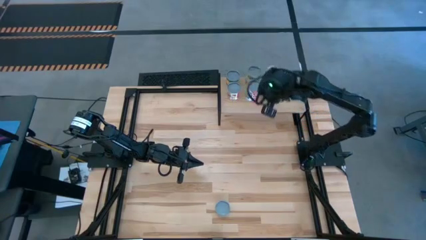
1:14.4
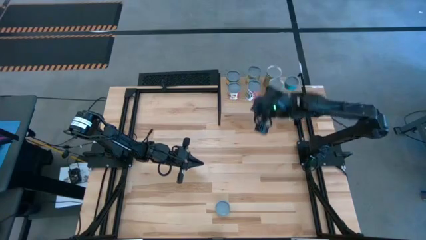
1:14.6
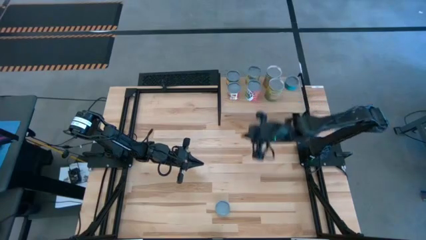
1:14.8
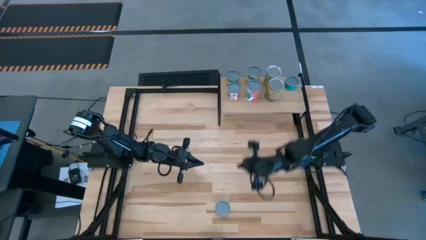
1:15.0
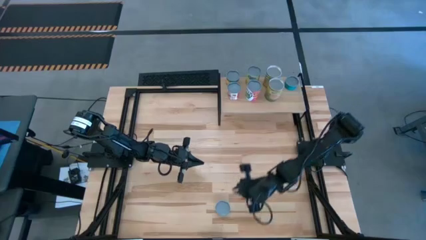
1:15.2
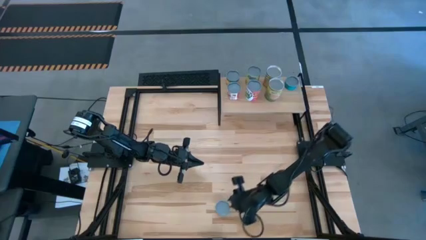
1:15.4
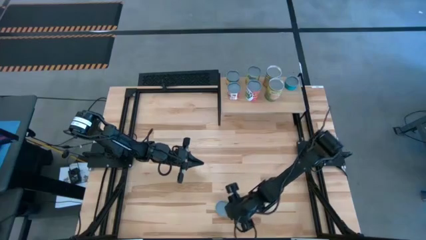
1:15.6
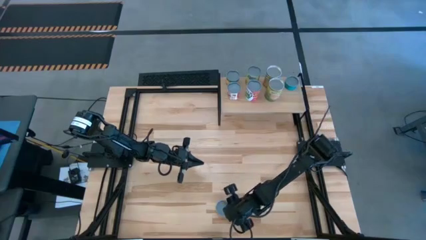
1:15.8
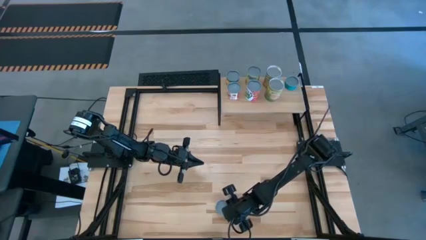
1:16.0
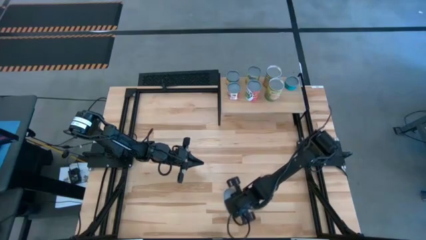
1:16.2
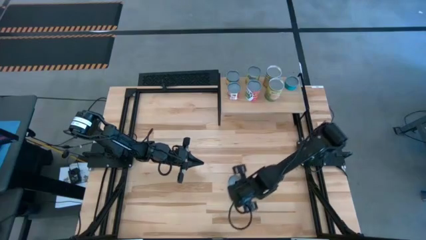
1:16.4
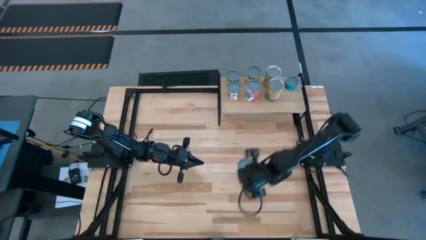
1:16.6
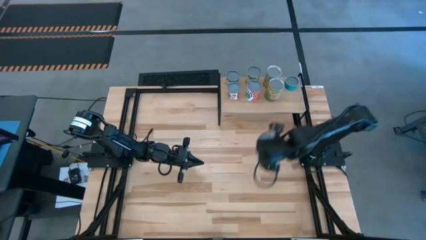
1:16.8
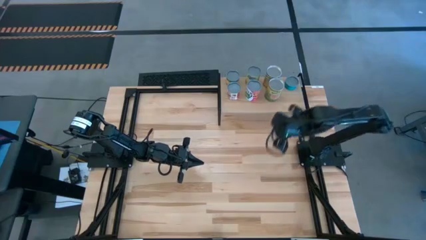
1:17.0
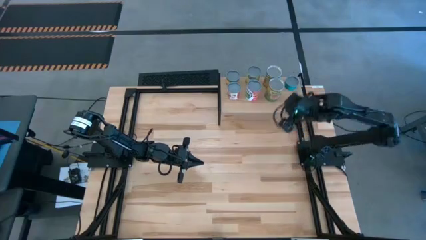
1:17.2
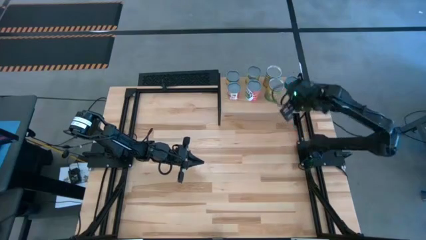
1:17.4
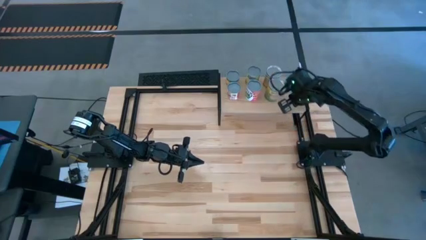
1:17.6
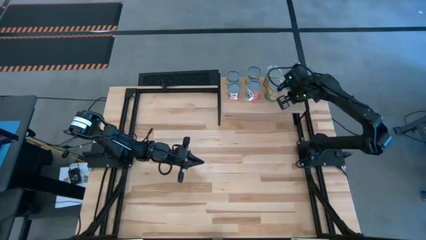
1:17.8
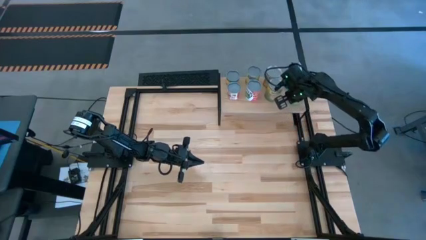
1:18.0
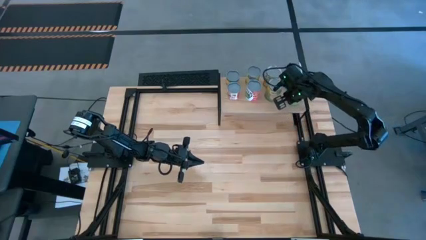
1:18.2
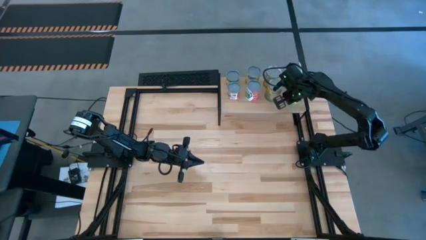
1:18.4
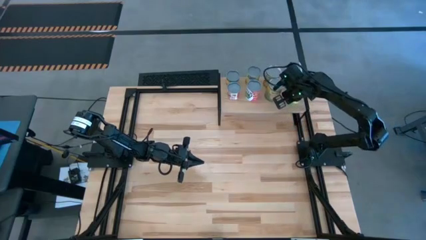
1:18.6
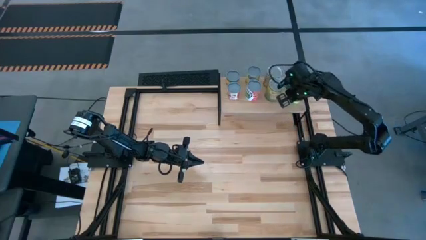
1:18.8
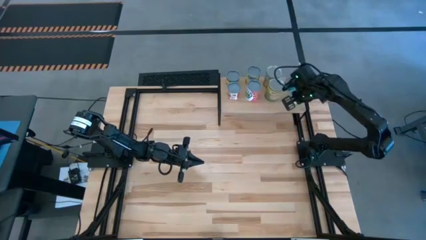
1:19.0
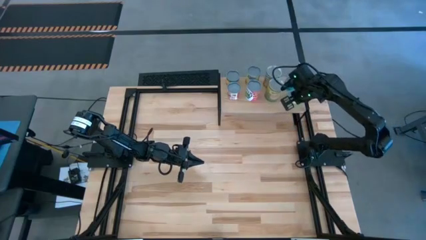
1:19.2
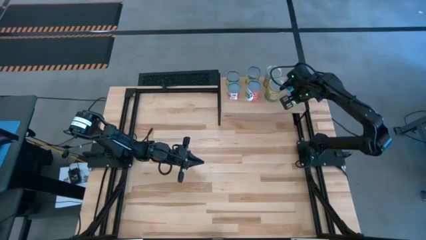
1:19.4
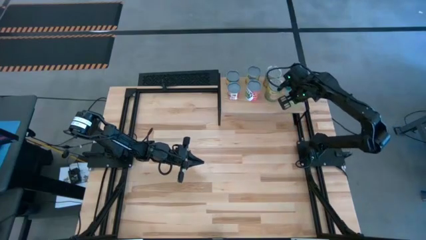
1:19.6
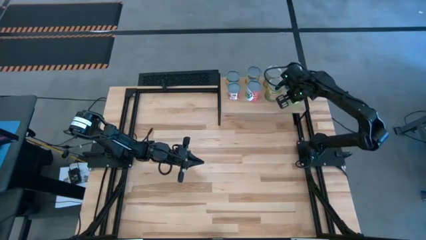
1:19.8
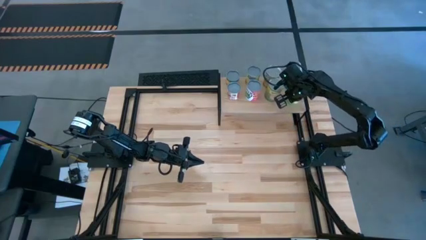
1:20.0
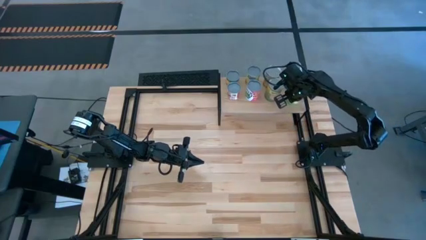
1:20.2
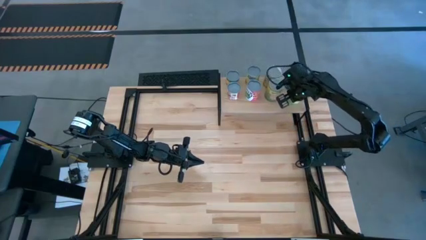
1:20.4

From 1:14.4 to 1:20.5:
Task: Pick and place cans onto a shelf
Put the canned mushrooms on the shelf

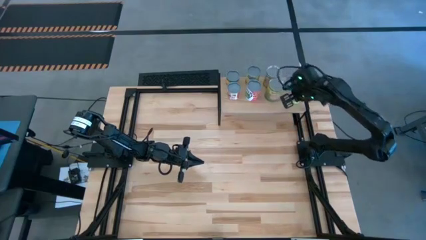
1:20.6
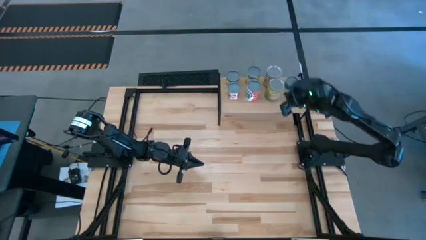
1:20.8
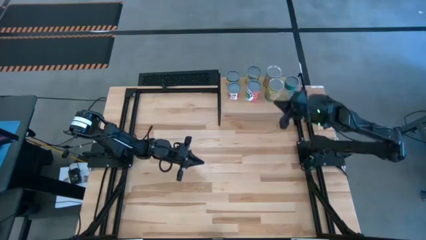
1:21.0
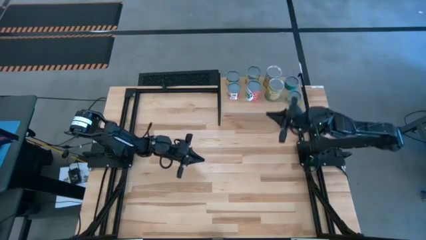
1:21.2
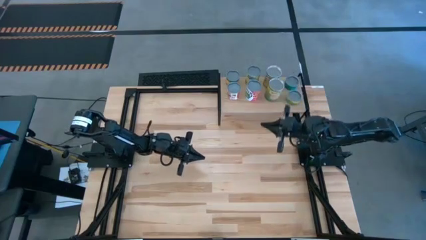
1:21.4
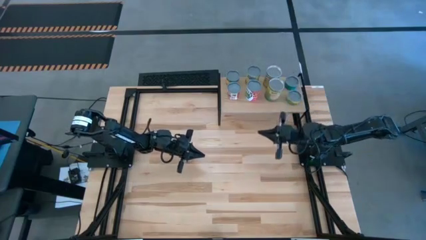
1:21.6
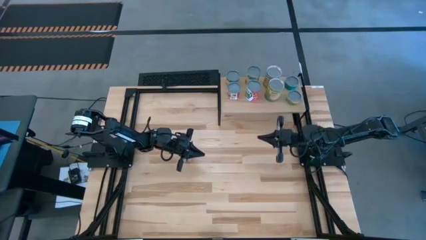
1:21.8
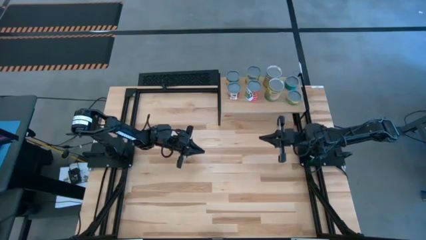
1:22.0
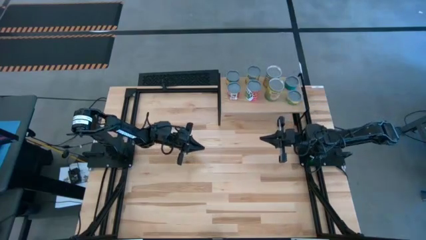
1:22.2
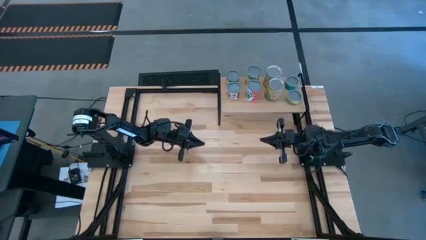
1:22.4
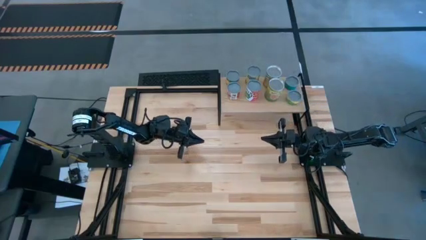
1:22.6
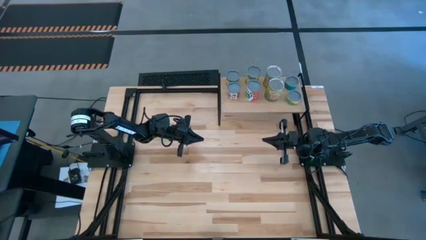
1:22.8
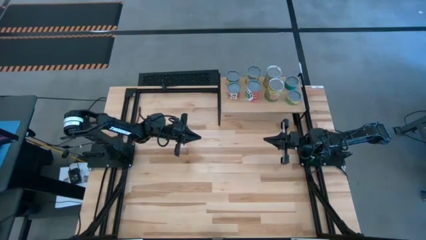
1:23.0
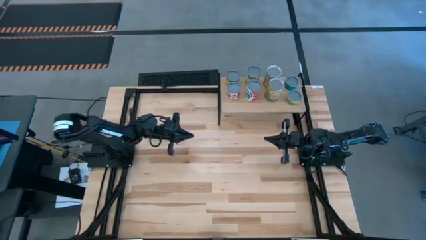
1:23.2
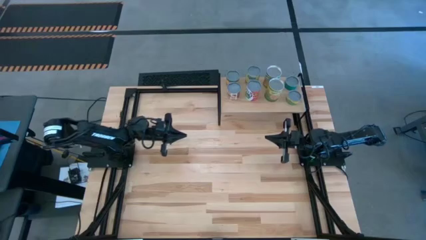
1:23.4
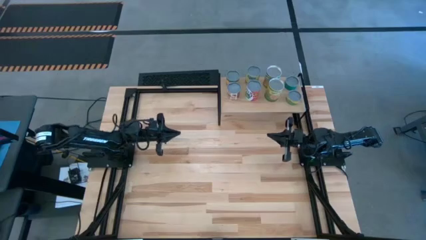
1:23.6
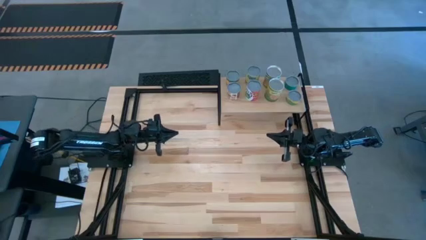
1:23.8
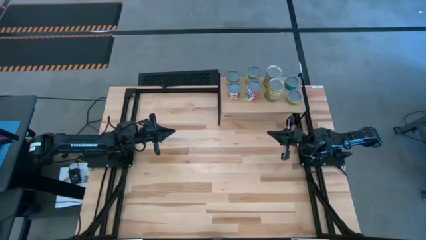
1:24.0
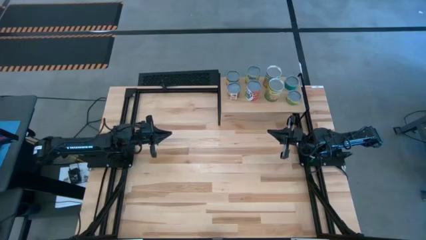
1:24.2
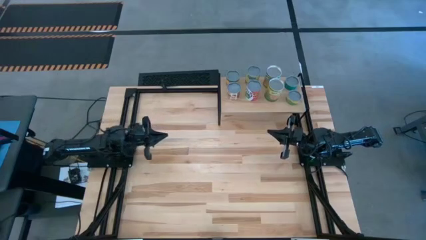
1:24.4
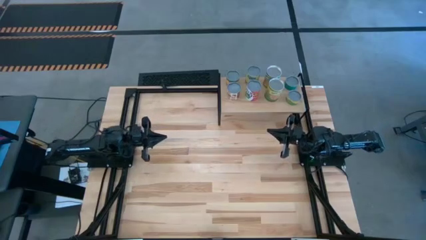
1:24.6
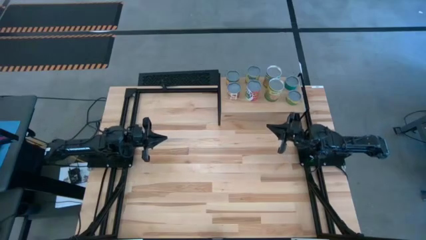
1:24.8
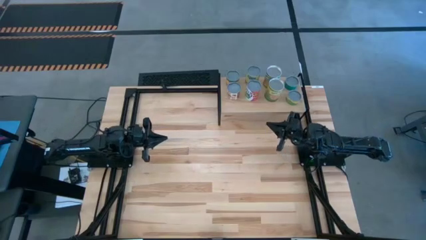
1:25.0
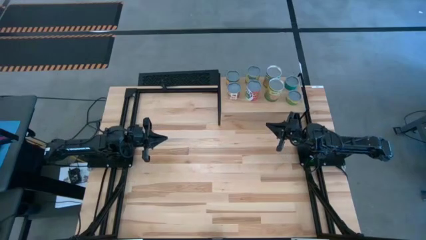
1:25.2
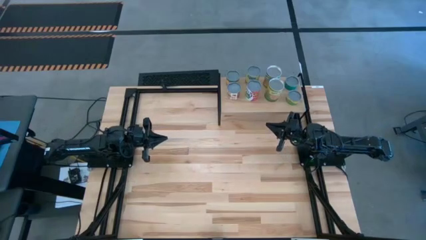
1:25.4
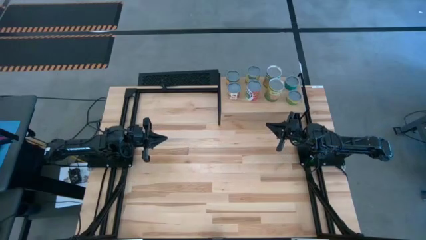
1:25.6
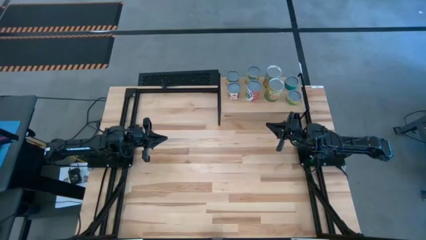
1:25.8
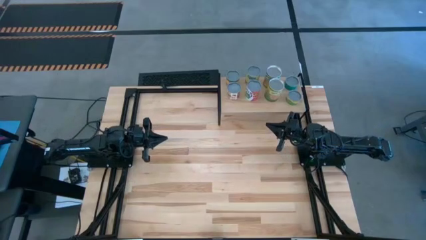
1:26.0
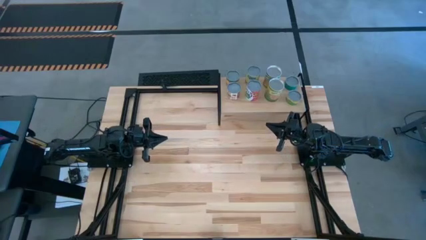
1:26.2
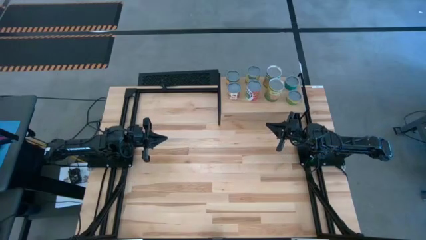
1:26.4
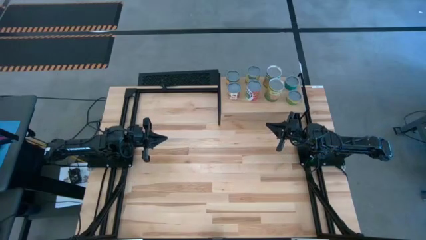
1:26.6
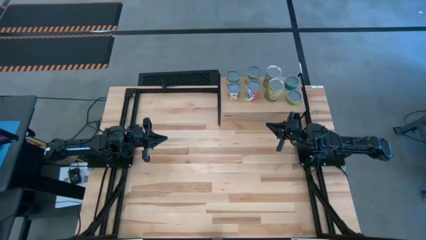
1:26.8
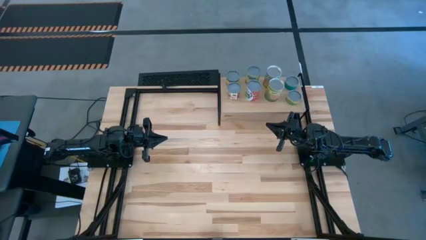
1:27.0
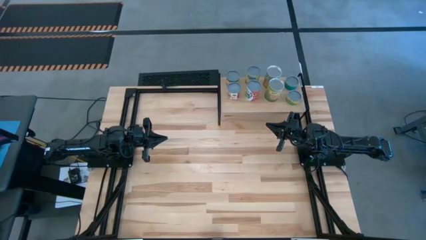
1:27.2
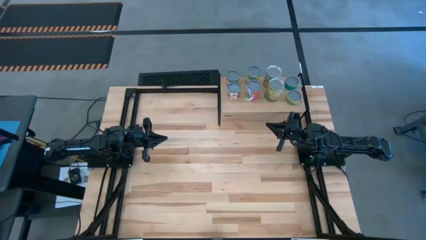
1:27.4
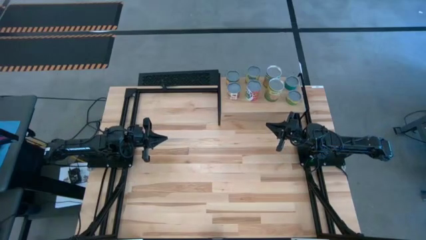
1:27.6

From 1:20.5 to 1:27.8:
Return to Home Position

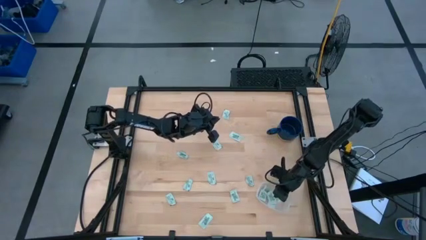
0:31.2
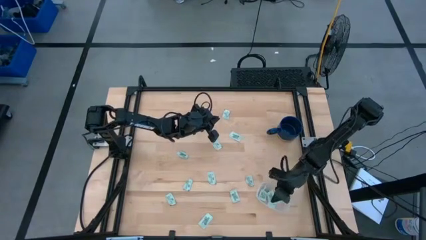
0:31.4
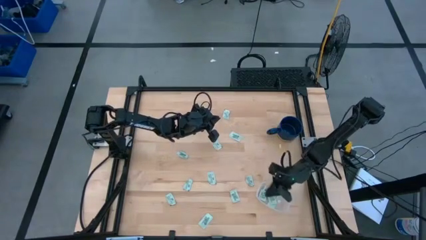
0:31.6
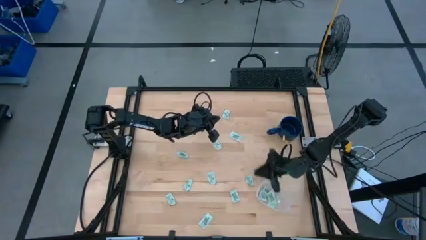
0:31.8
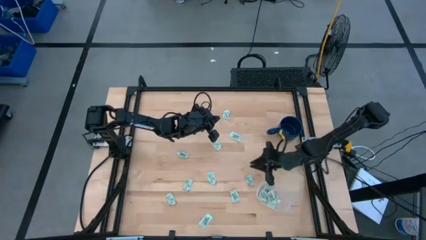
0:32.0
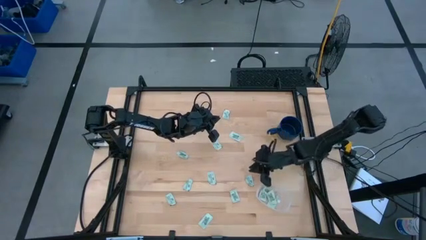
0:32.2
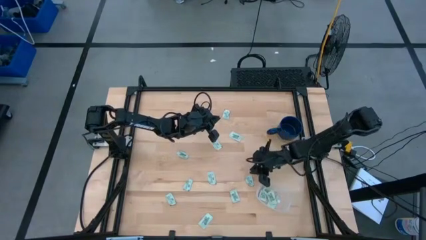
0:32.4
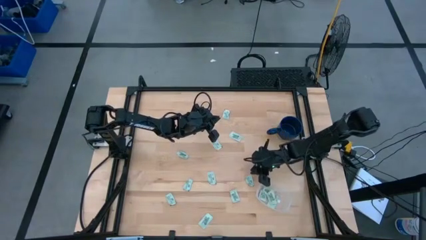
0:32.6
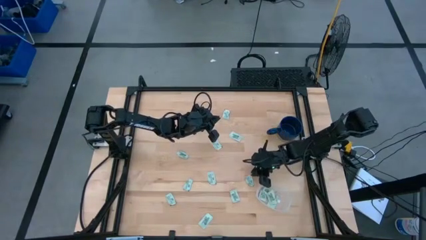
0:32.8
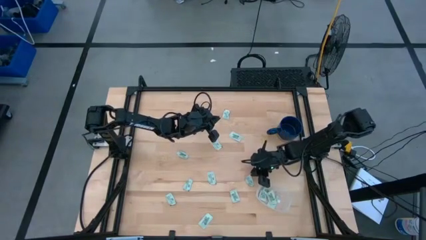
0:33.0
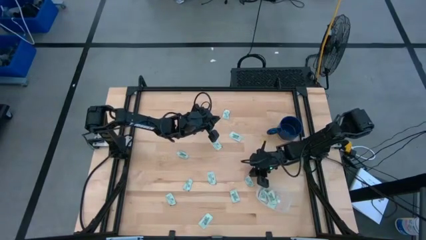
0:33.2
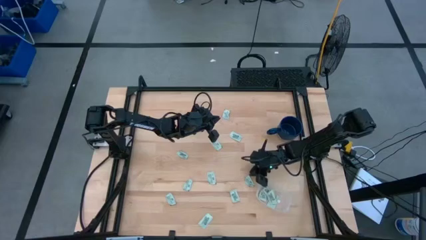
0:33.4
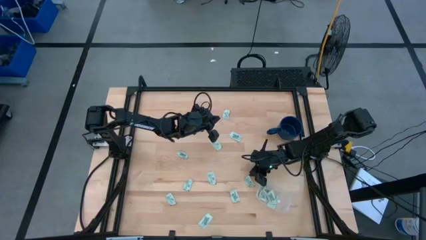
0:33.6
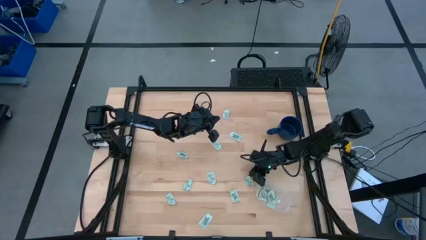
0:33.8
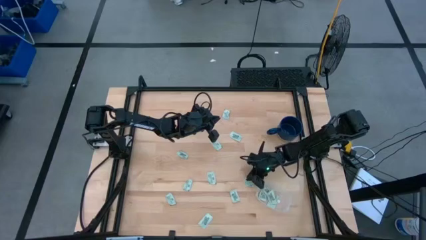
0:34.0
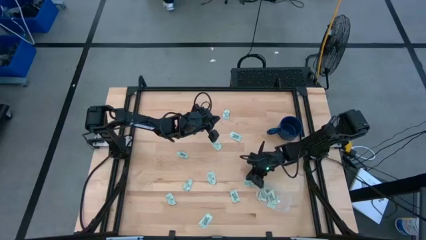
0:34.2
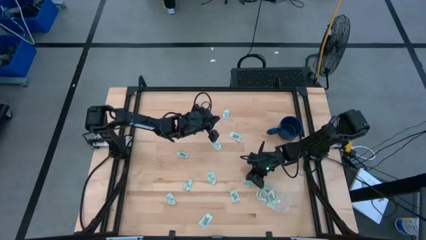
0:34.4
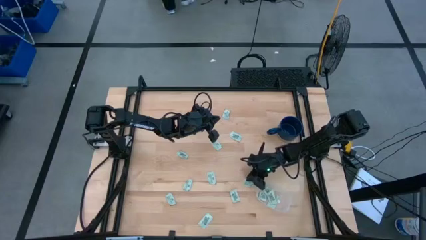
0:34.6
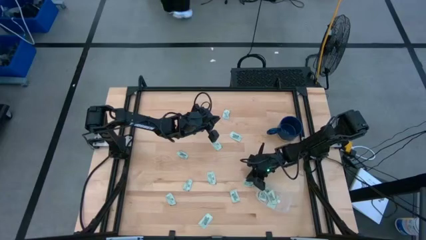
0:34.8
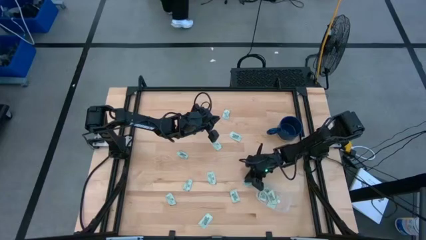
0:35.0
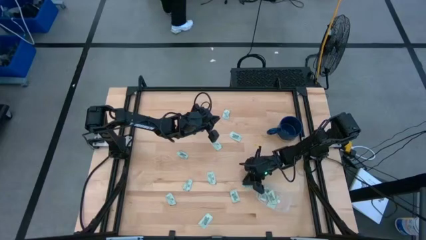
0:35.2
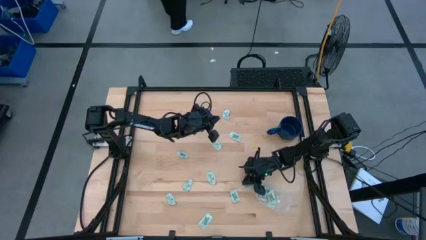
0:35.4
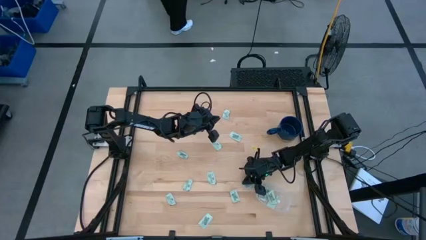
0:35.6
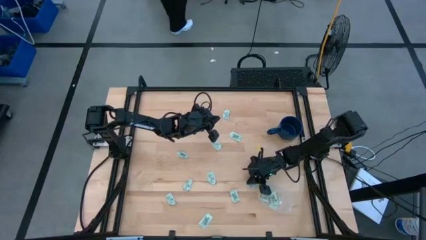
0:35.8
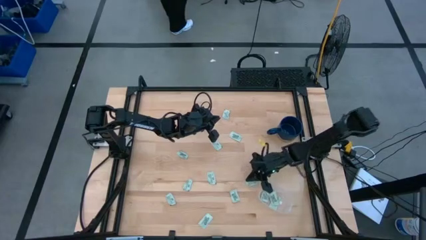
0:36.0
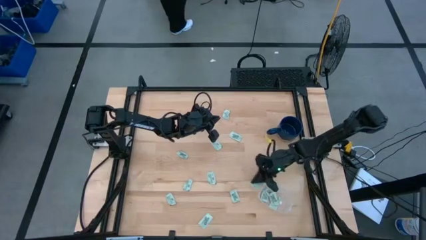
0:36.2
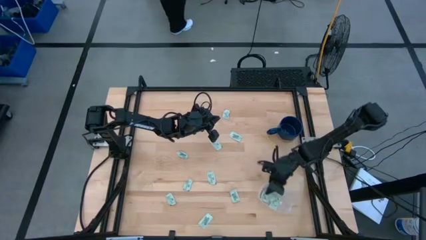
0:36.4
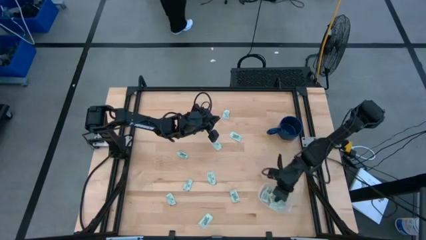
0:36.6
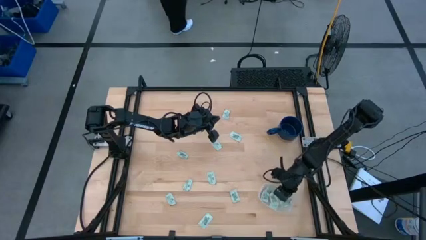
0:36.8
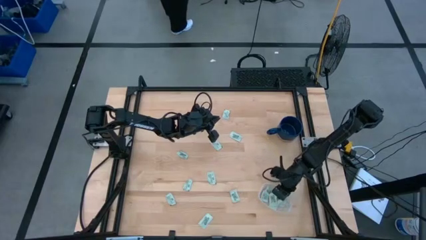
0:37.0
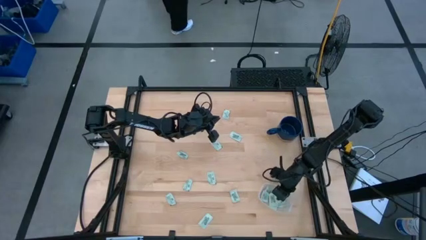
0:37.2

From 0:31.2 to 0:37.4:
Task: Pick and place Stevia / Truvia into bins
Put the stevia packet into the transparent container
